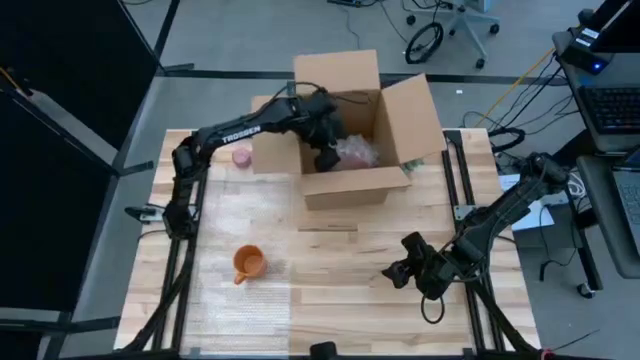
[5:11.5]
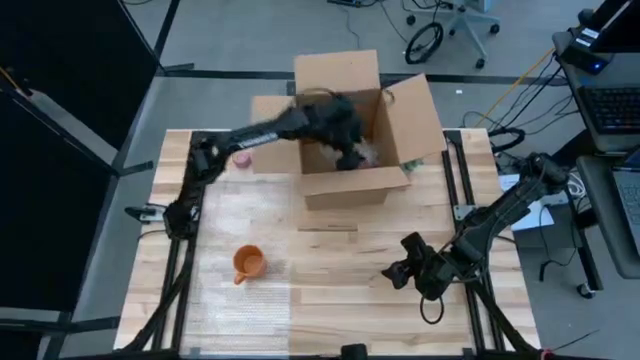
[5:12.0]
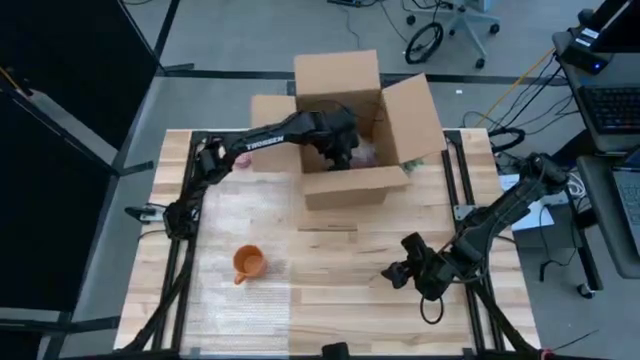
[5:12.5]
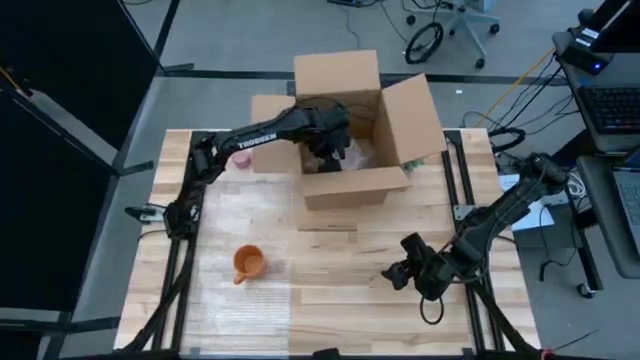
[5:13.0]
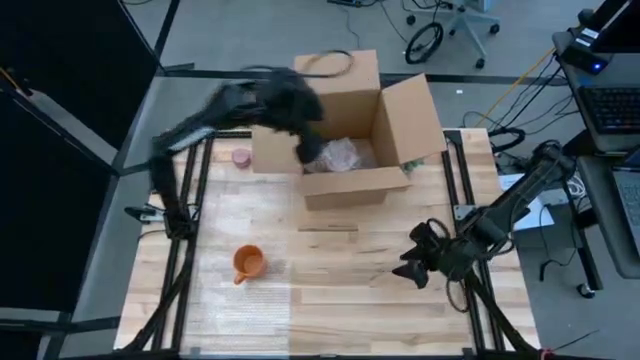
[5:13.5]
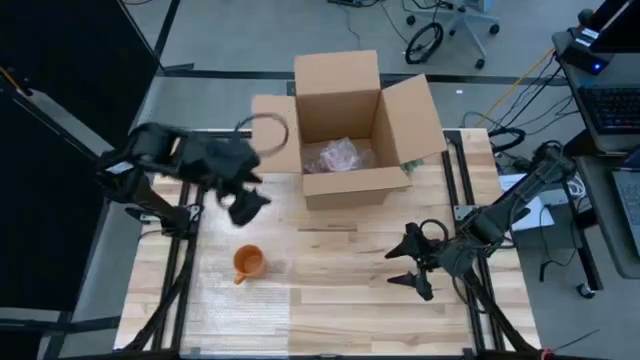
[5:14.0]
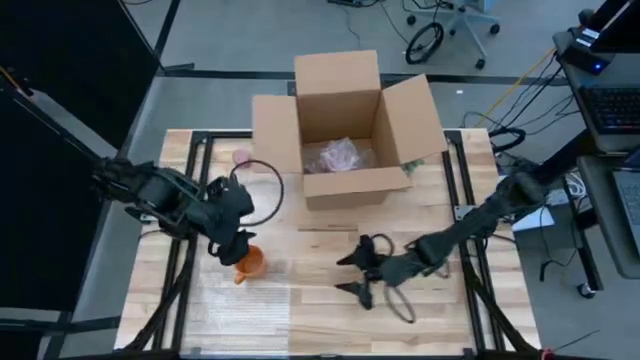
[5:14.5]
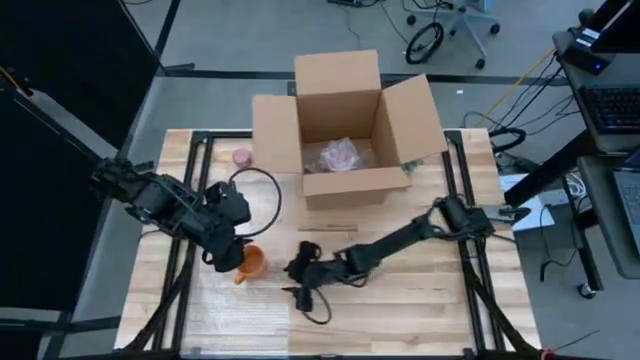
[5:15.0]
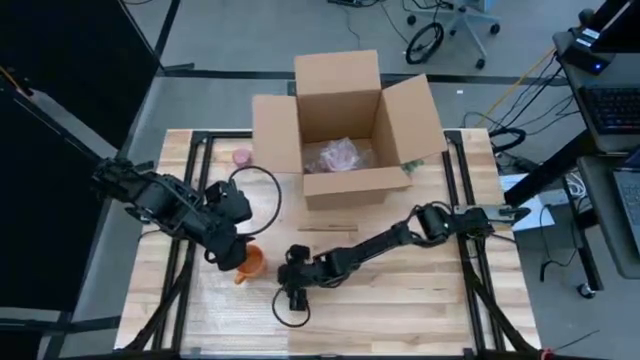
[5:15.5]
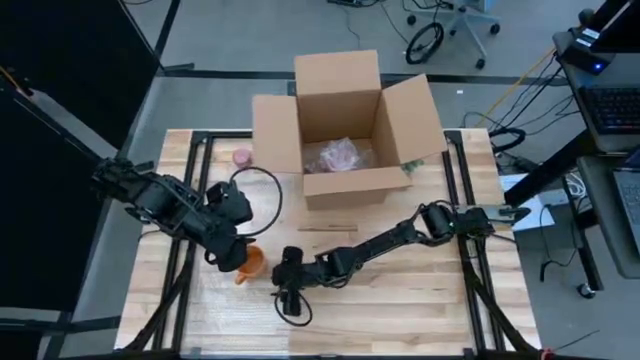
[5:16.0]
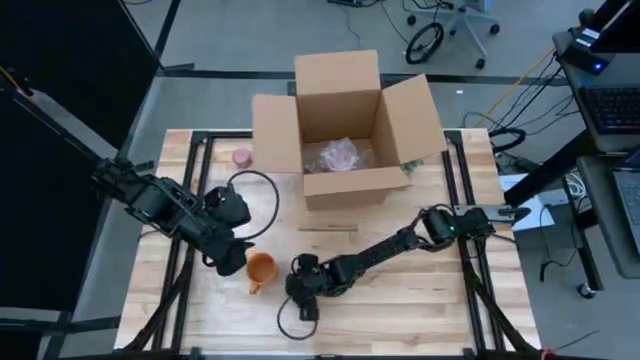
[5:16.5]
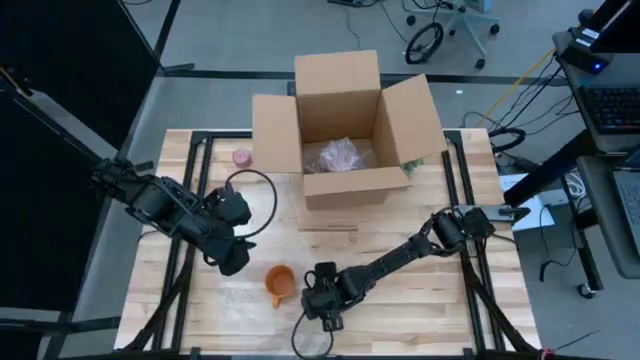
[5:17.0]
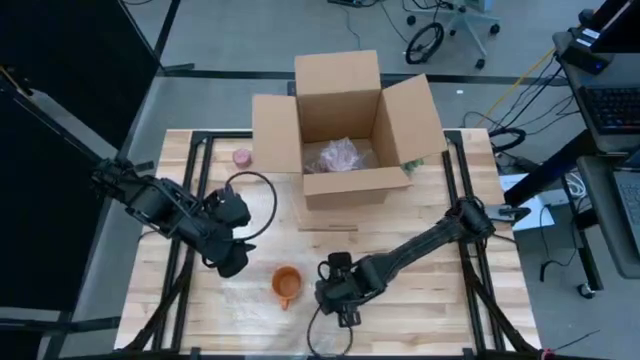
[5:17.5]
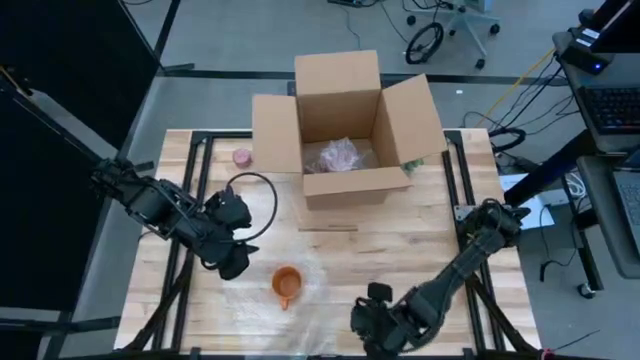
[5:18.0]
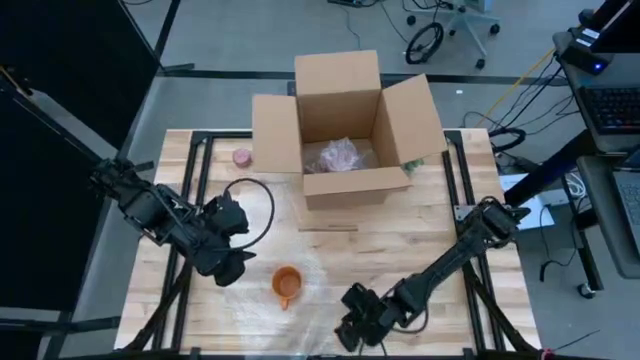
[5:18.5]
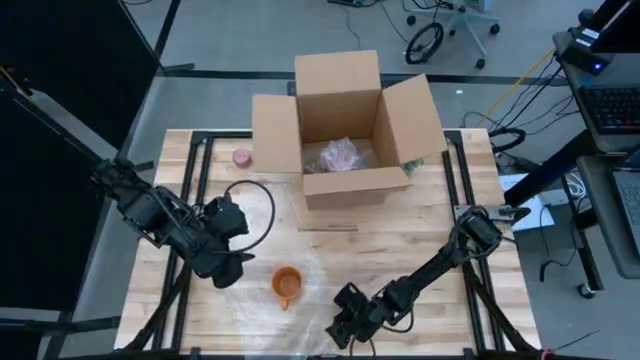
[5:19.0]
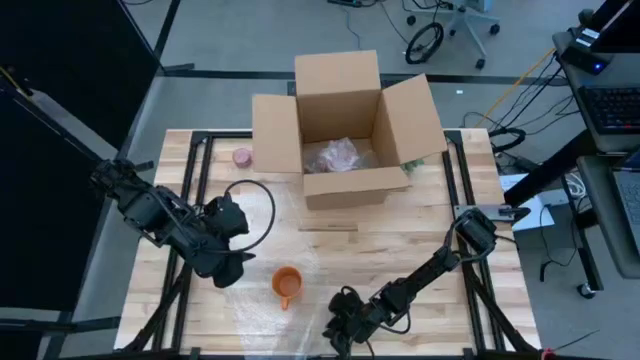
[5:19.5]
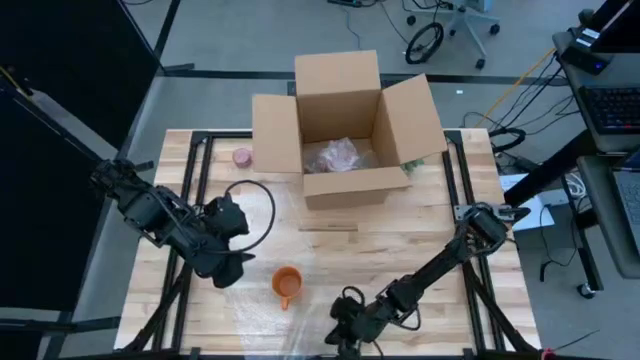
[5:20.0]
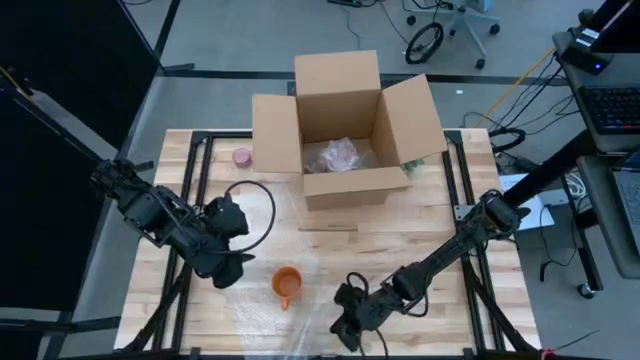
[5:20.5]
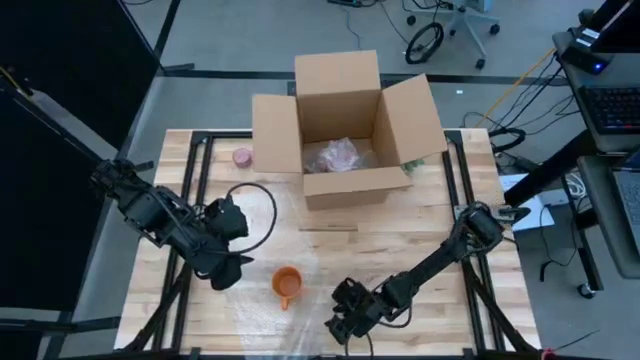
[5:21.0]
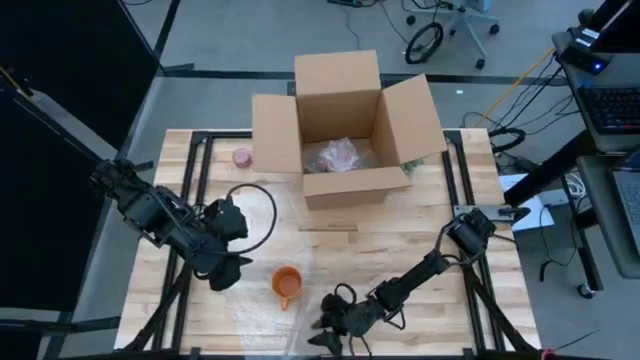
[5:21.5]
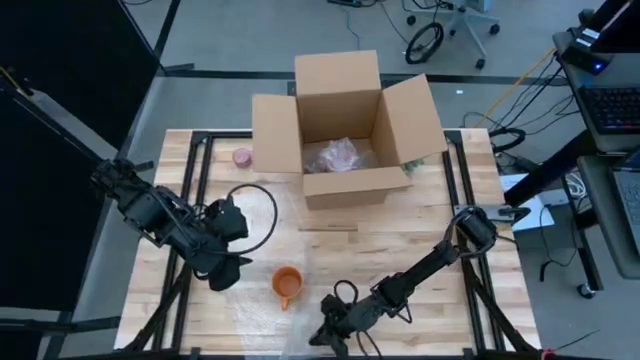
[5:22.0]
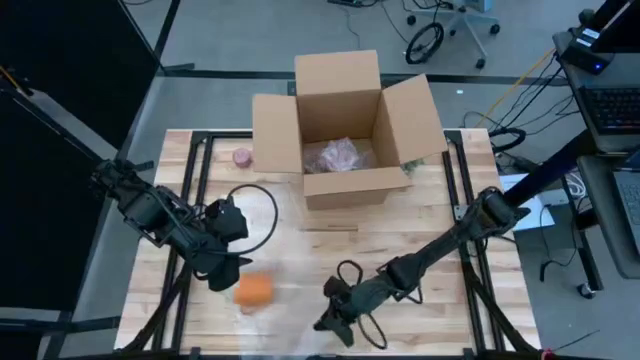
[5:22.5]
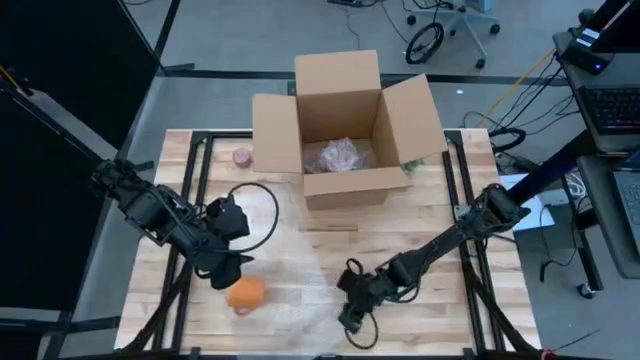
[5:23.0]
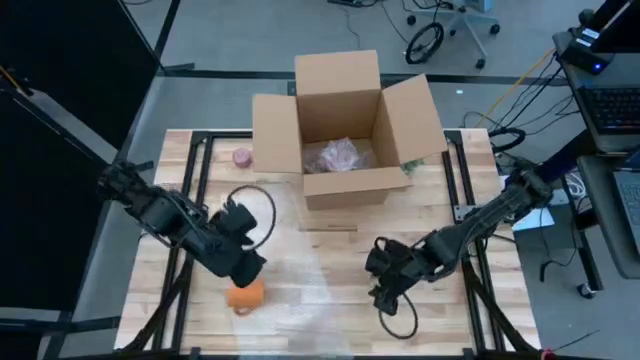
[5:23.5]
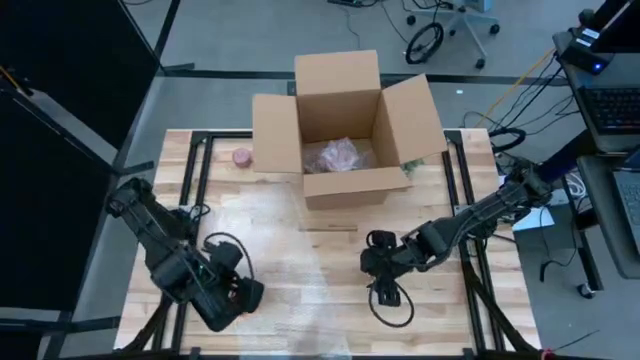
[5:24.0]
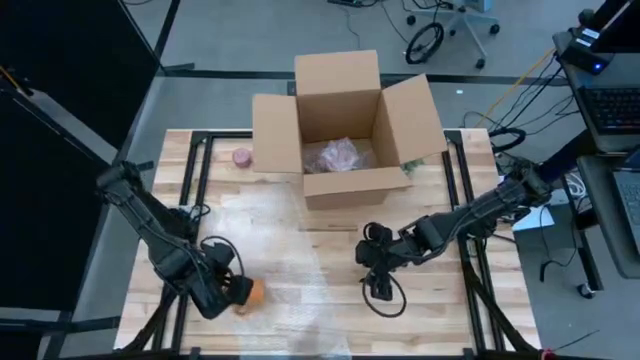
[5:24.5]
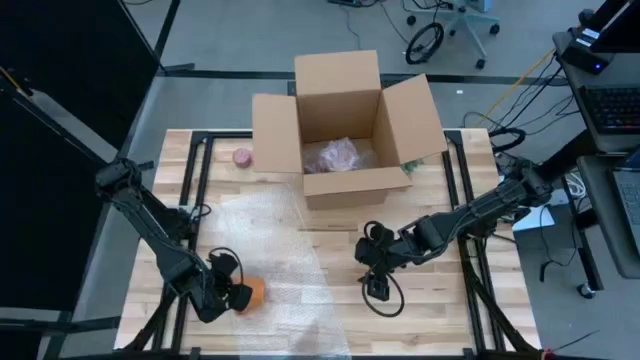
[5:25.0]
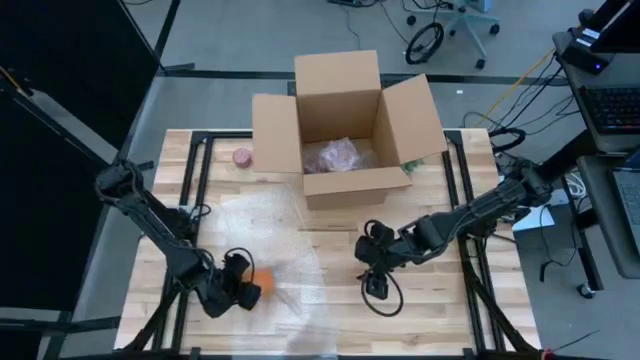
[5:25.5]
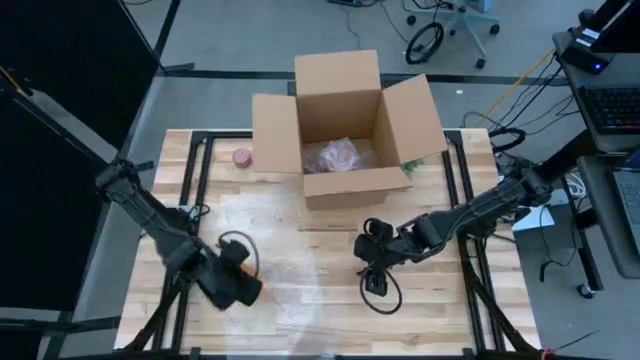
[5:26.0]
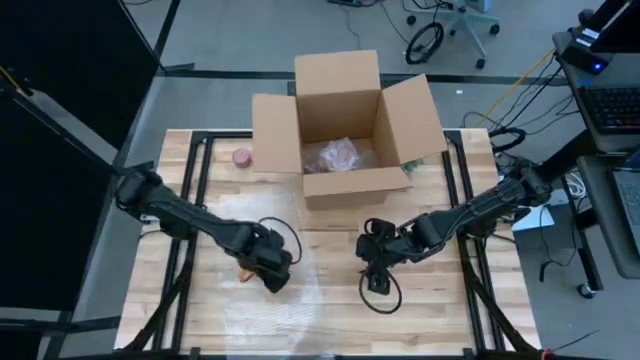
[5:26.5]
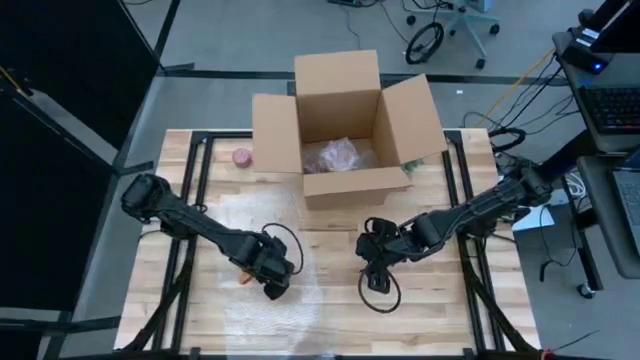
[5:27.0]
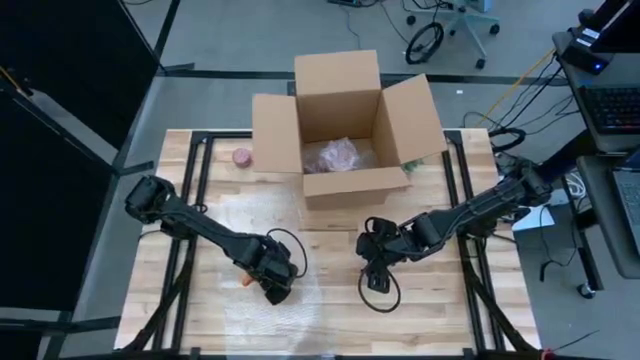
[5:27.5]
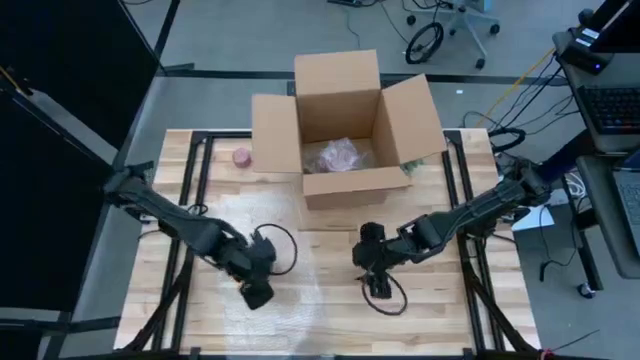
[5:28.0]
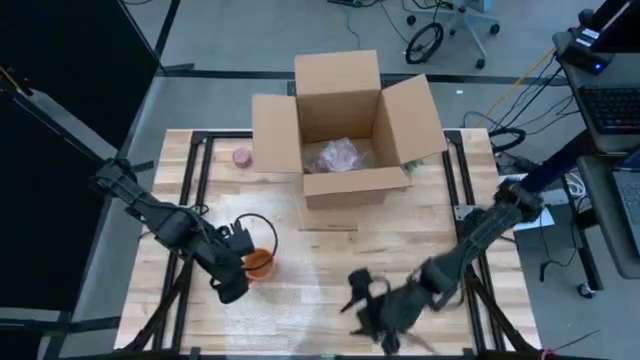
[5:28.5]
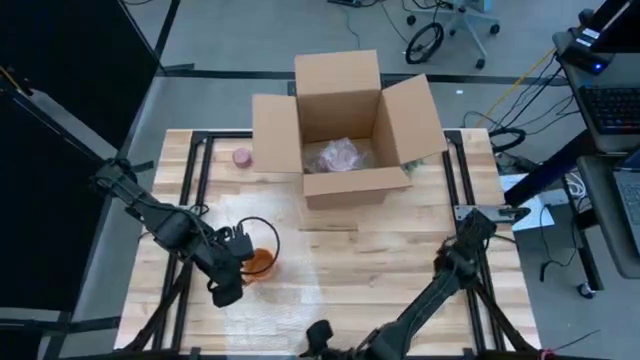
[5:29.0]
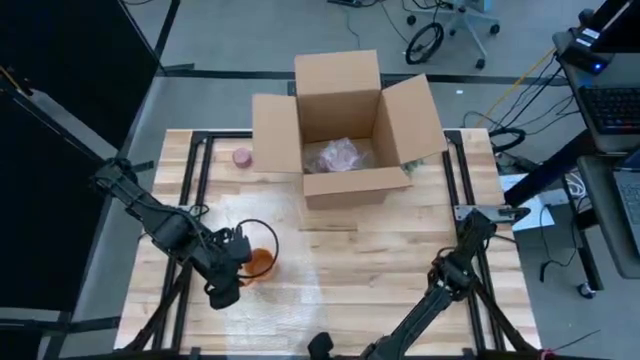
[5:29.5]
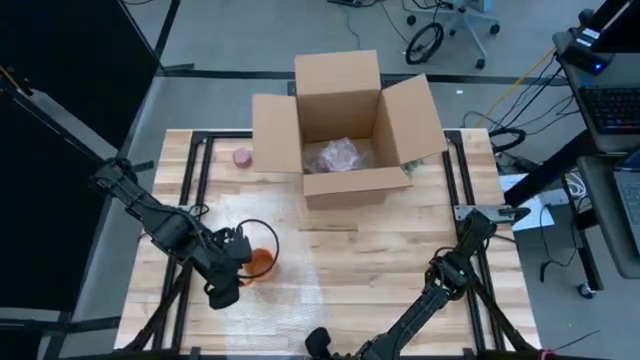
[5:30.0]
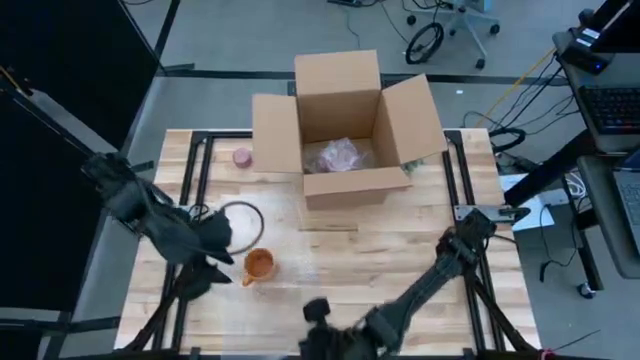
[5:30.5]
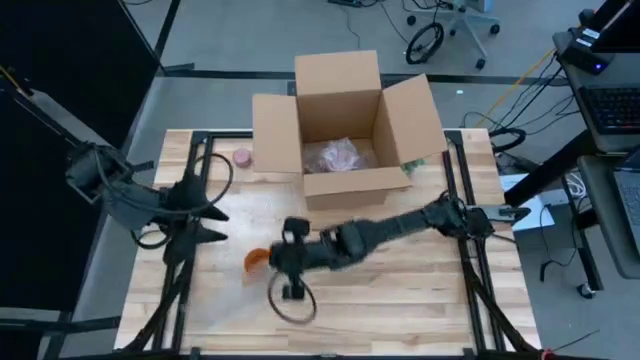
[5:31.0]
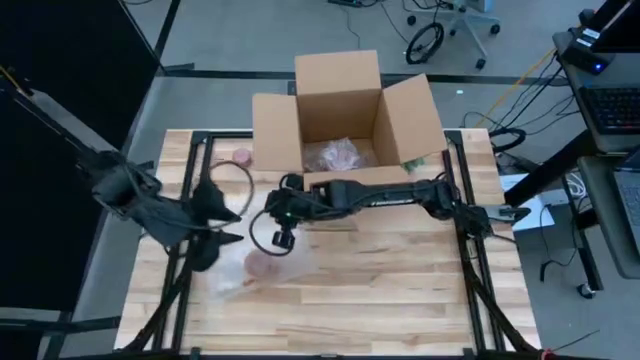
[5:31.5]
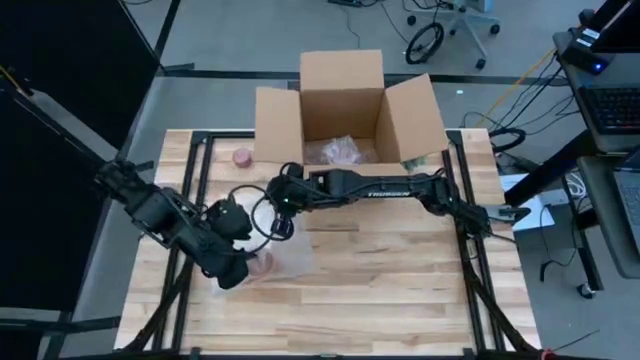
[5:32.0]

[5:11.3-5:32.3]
Task: wrap mug
Wrap the orange cup with the bubble wrap

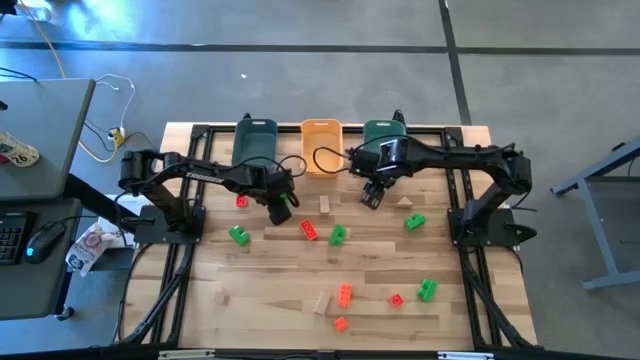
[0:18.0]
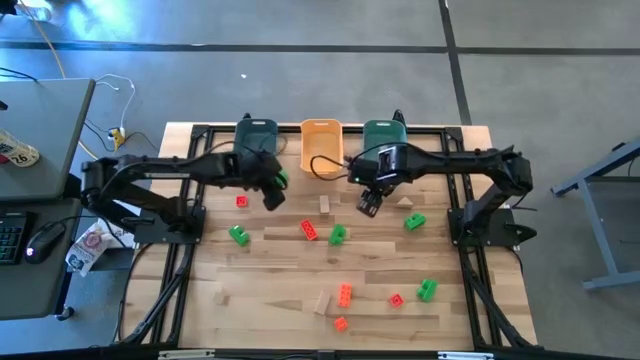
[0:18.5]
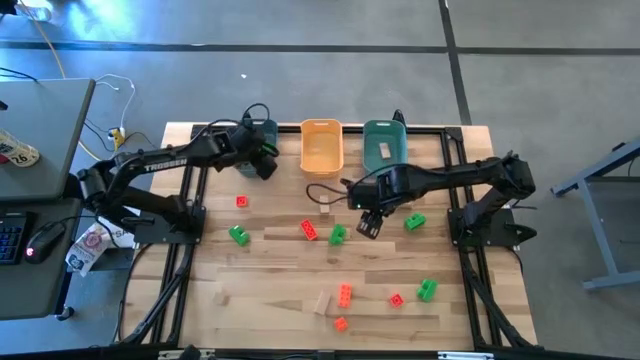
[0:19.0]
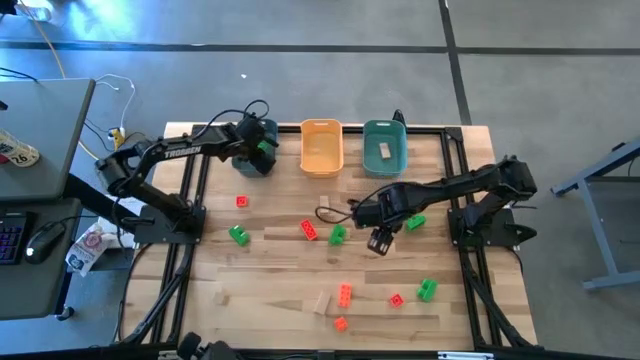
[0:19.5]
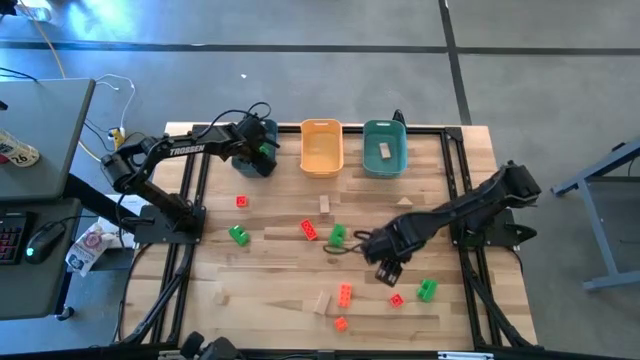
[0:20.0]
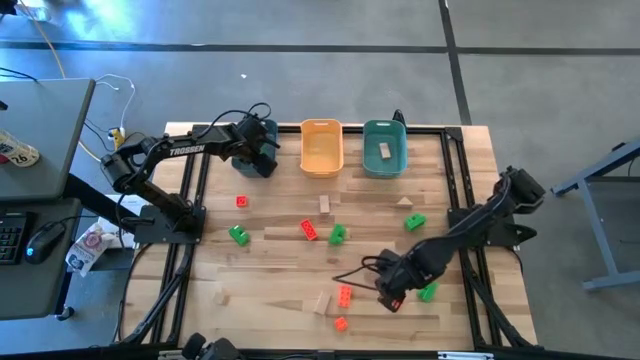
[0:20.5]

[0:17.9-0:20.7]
Task: Sort & place blocks by color
Put the green game piece into the dark blue bin
